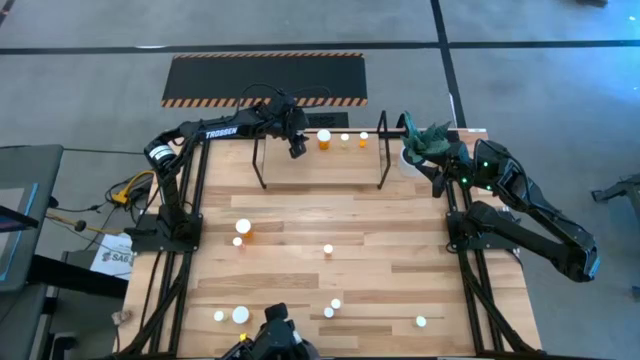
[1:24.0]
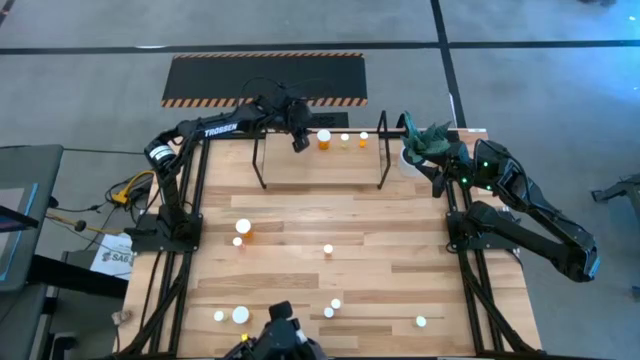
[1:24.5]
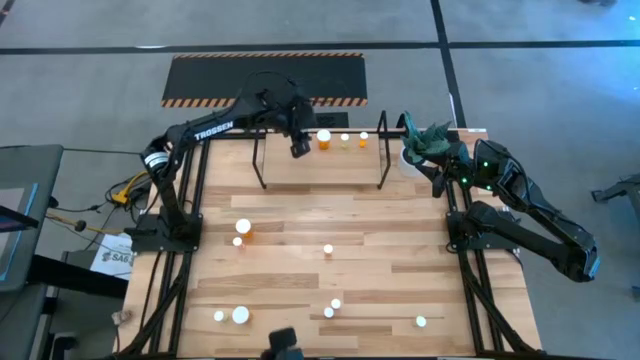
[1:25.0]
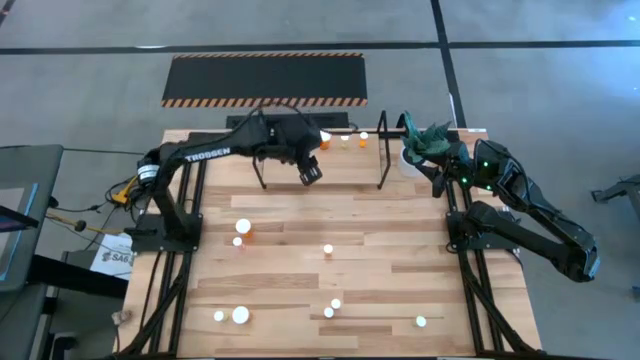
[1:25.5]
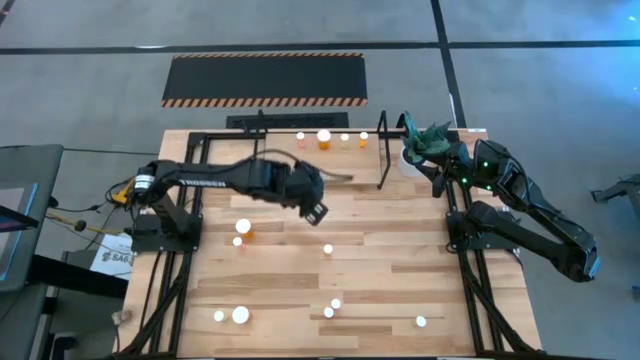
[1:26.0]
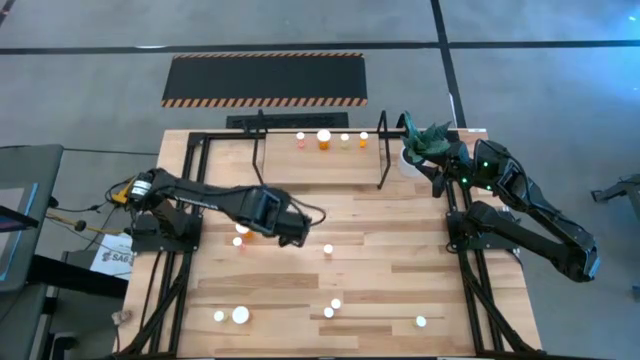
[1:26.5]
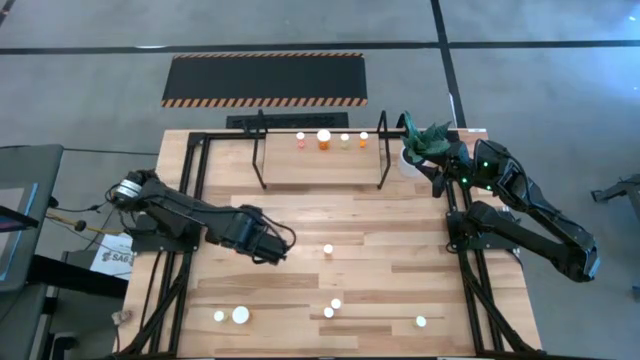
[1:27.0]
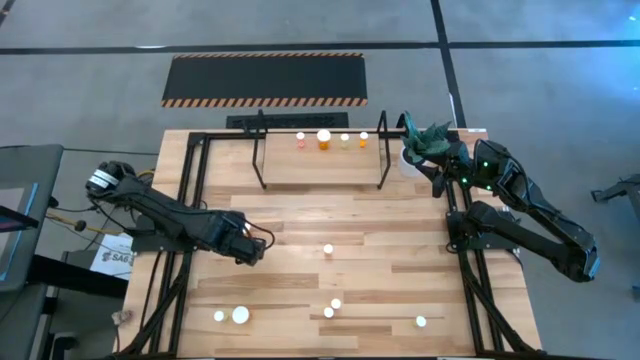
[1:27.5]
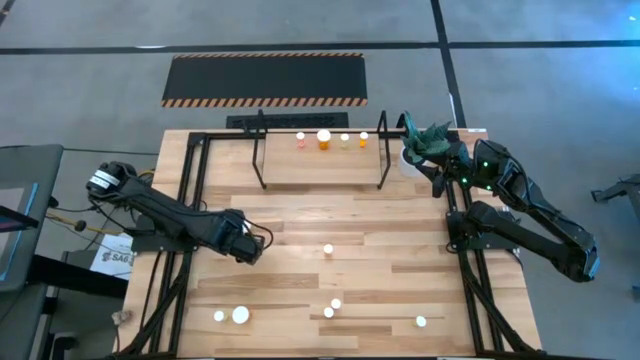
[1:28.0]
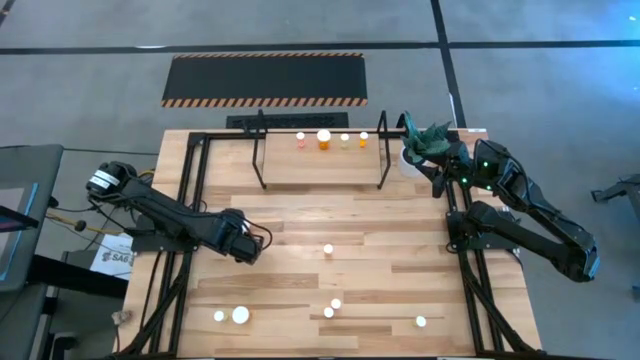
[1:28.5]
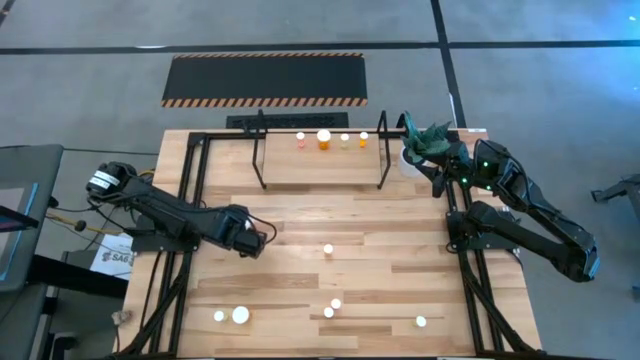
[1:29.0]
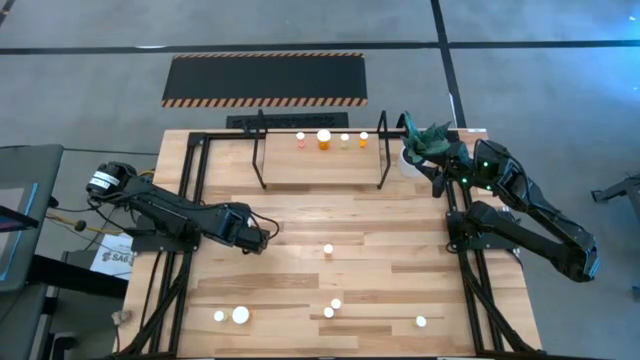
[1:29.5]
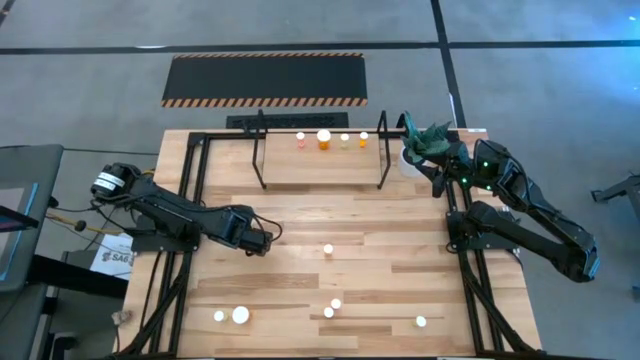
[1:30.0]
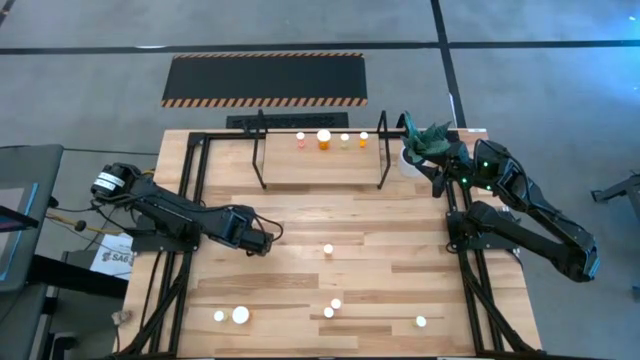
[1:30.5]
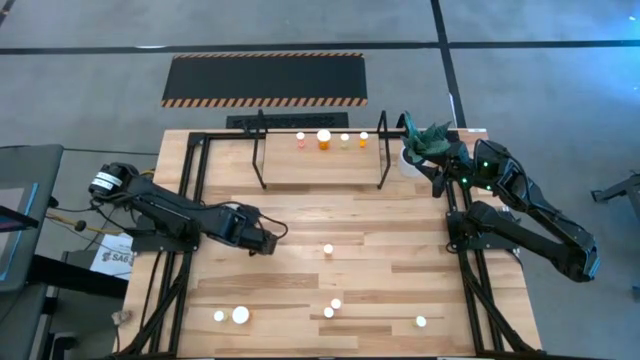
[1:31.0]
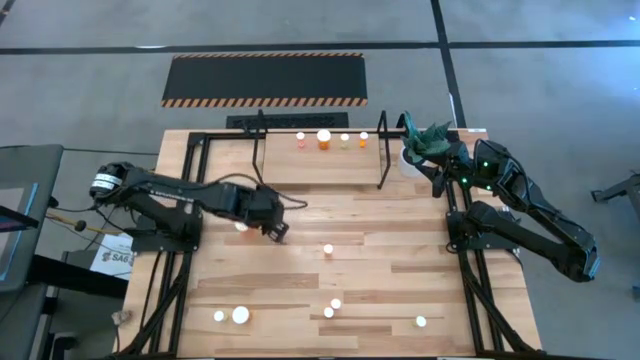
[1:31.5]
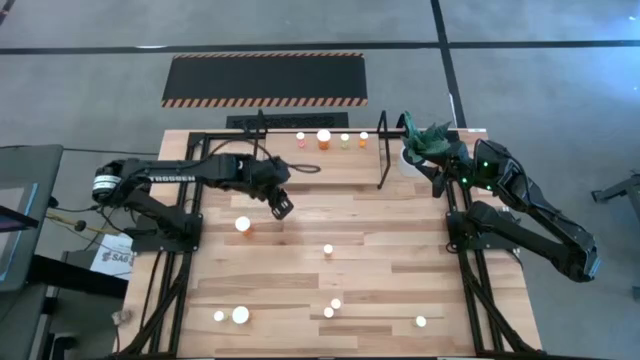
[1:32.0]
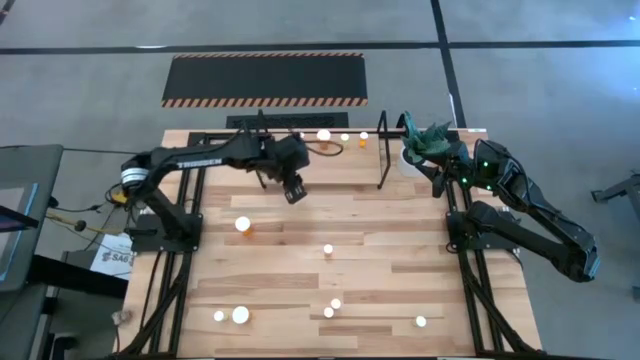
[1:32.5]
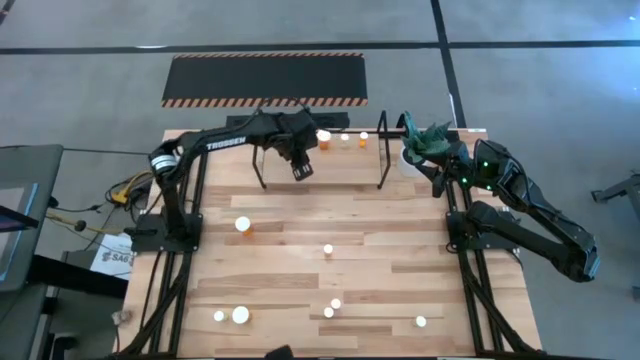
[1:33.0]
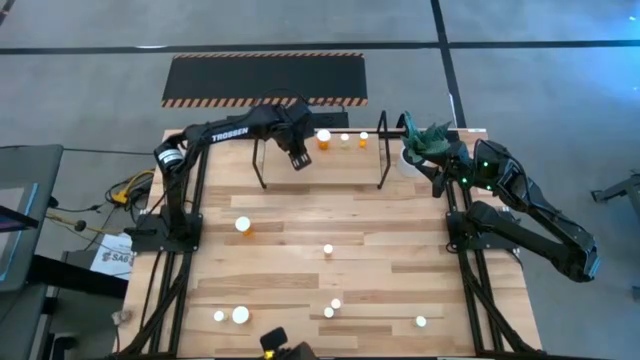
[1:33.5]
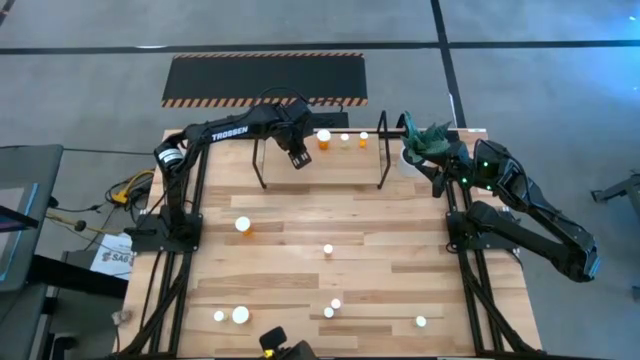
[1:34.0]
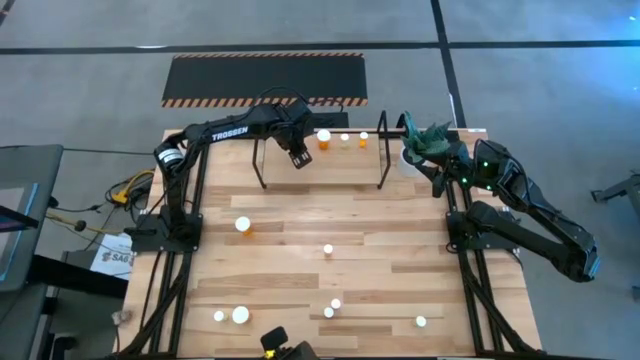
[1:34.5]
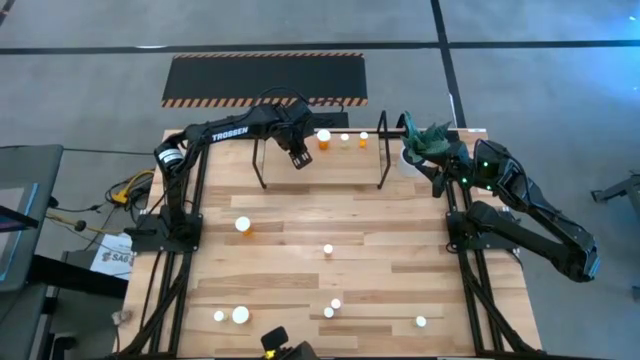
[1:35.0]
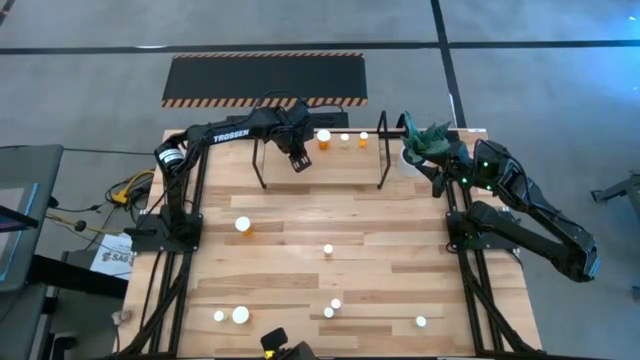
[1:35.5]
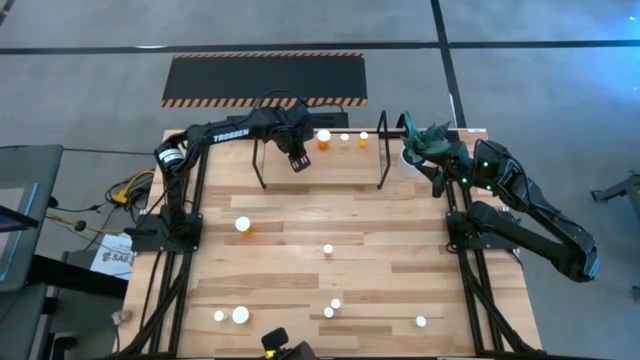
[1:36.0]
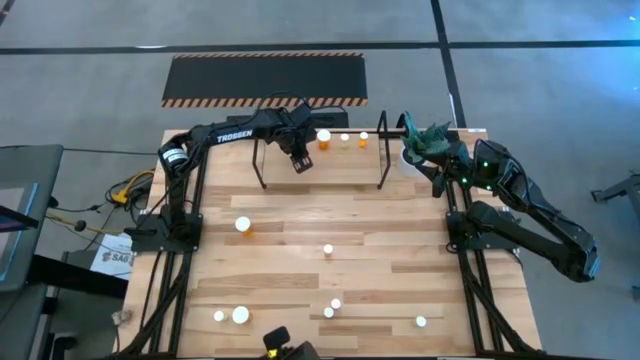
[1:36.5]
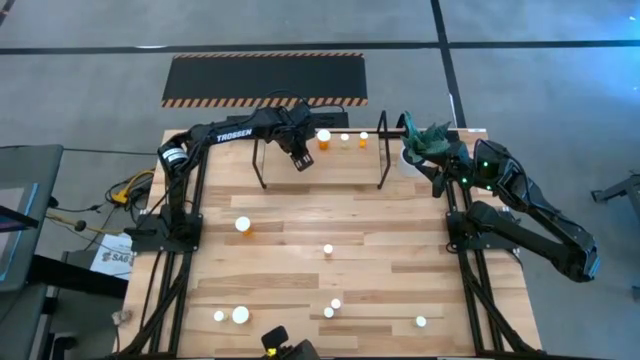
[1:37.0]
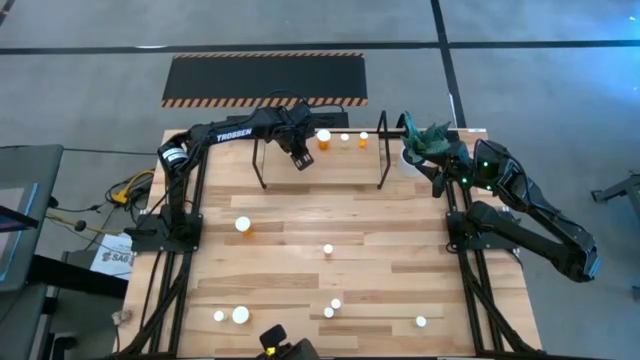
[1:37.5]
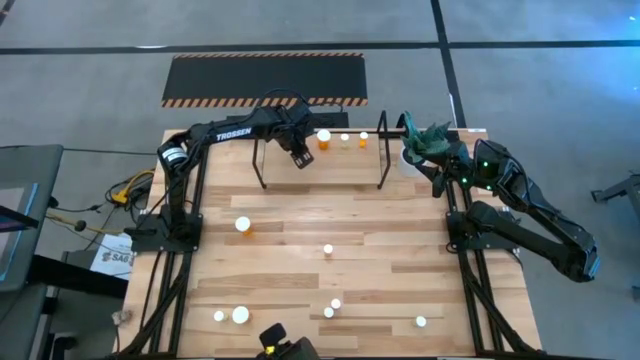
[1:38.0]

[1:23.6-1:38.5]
Task: Pick and place medicine bottles onto shelf by color
Put the top pink pill bottle on the shelf aligned with the other pink pill bottle

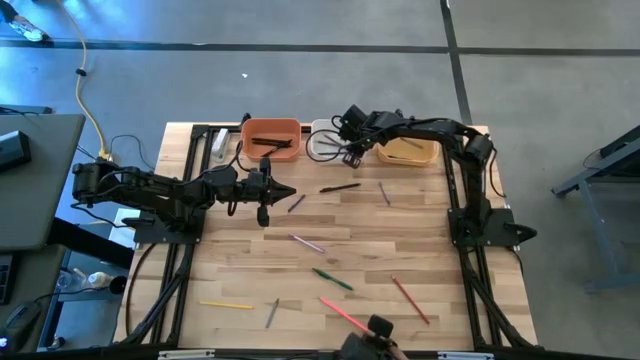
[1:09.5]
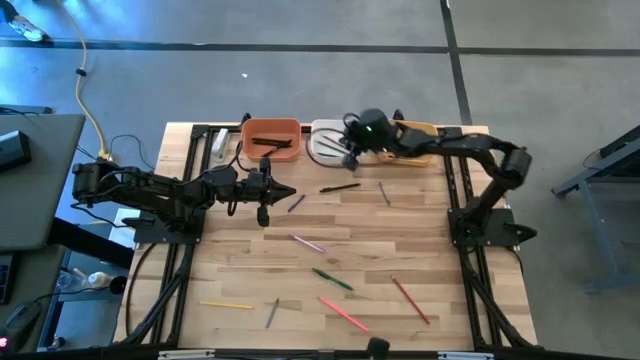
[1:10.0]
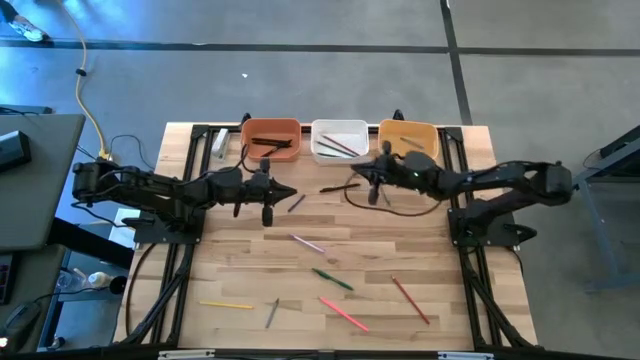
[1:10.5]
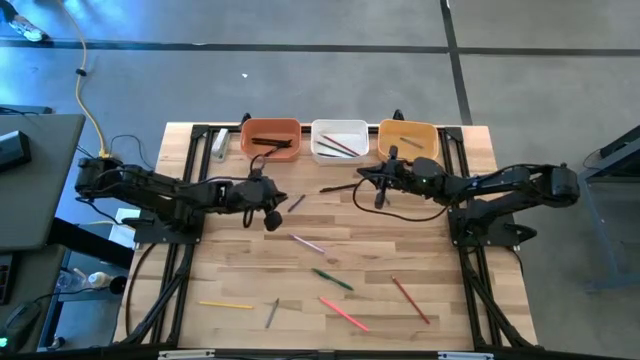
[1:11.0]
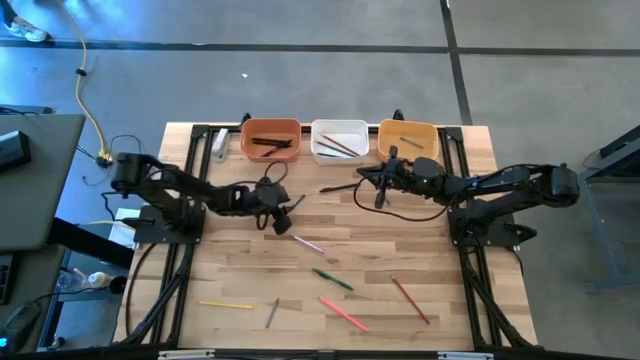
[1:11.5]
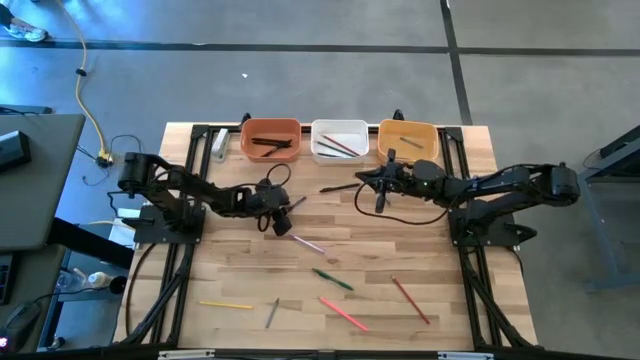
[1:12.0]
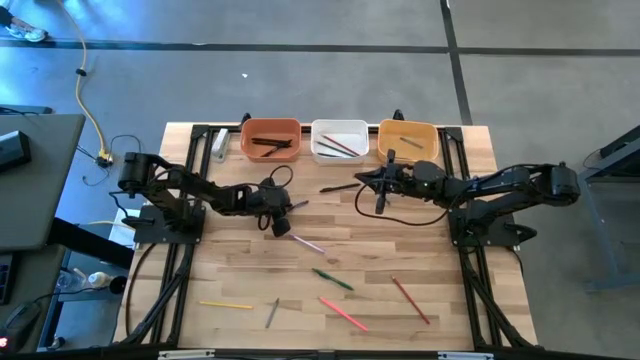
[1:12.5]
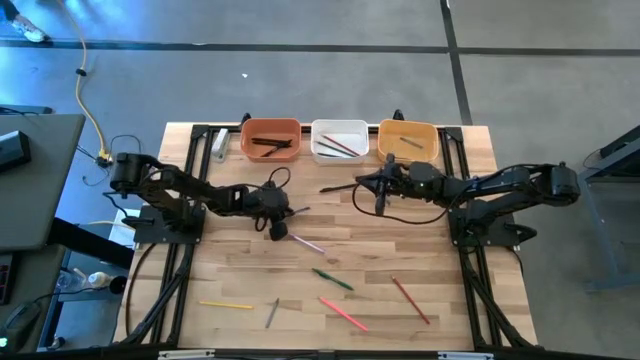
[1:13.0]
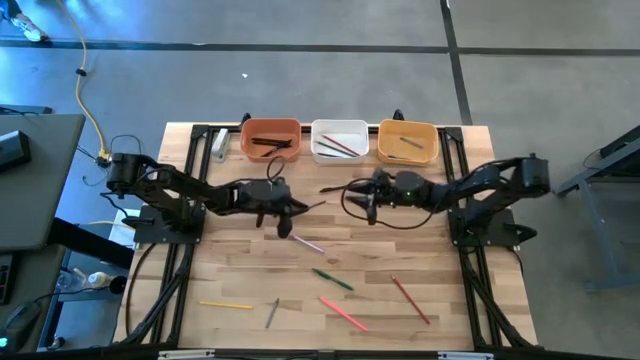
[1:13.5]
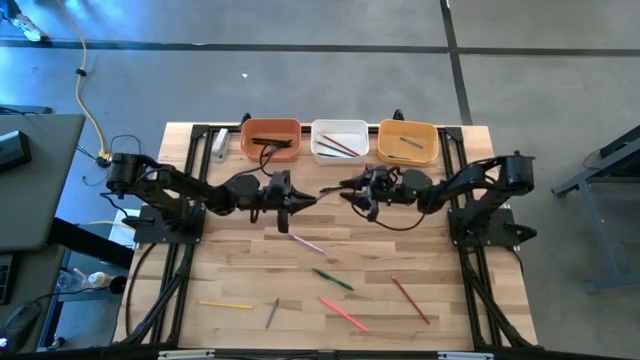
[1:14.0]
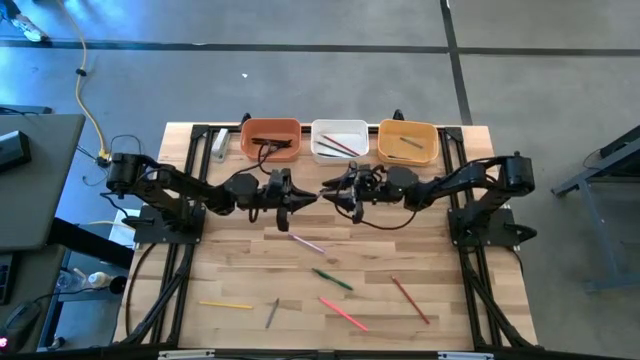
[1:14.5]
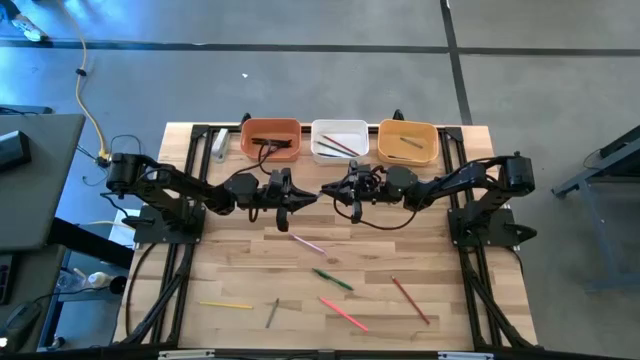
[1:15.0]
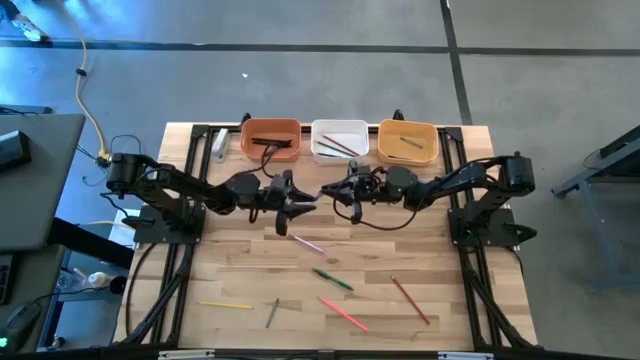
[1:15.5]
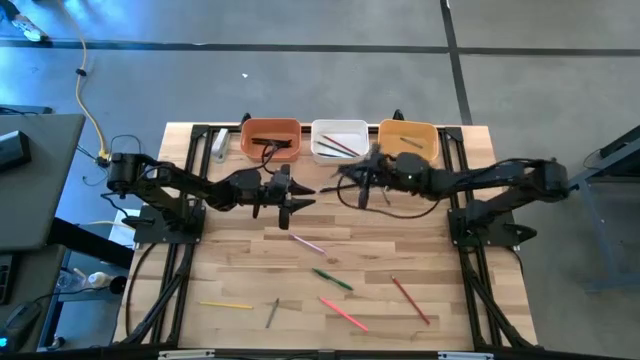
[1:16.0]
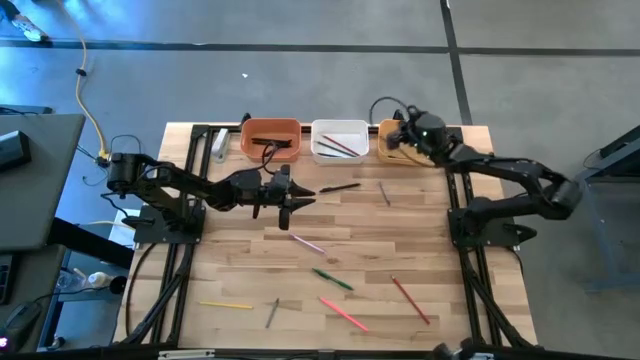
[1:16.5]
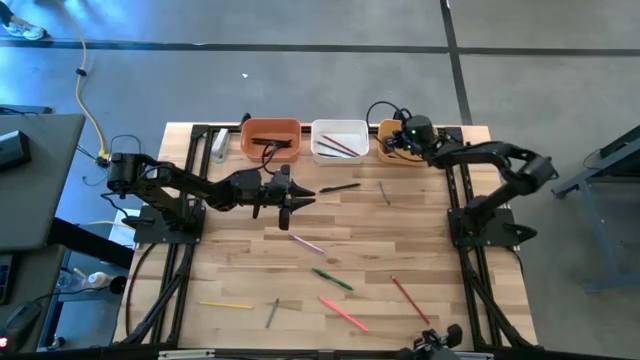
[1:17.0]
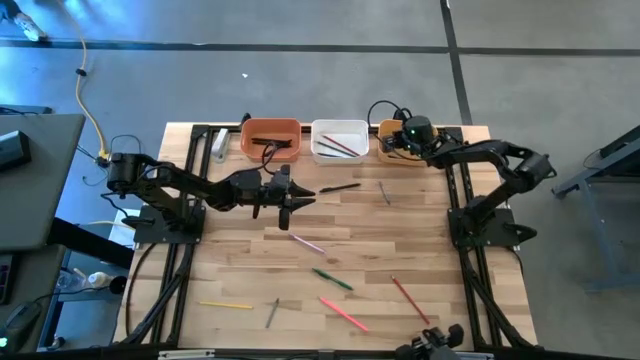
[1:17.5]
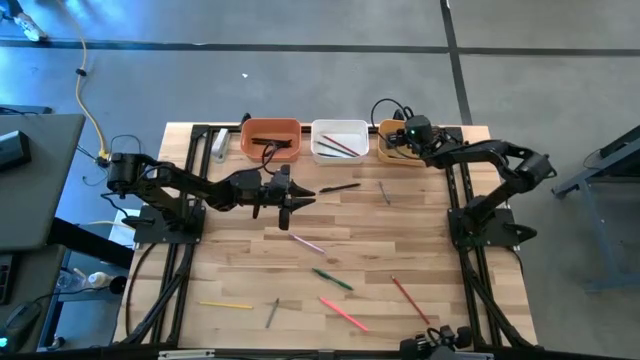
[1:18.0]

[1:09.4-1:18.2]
Task: Sort crayons/erasers/pens/pencils in bins
Put the blue crayon into the yellow bin
